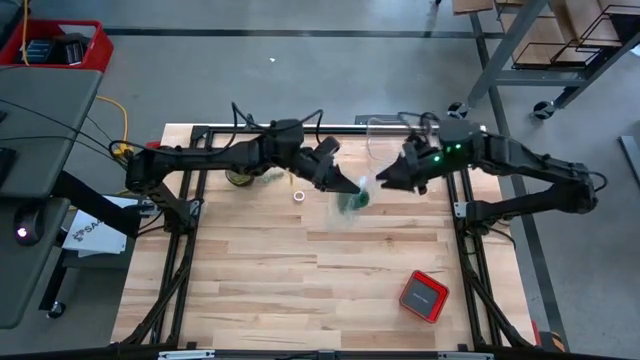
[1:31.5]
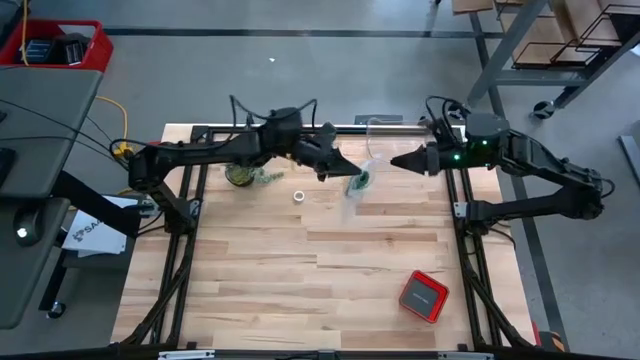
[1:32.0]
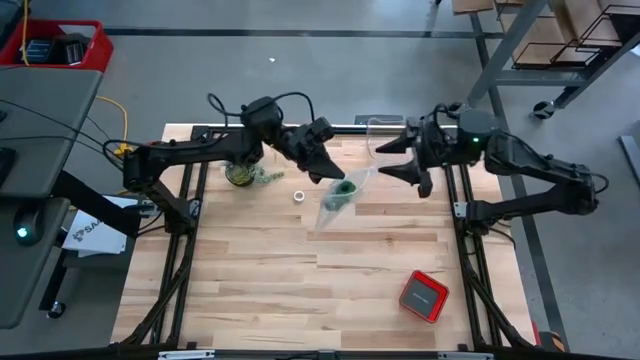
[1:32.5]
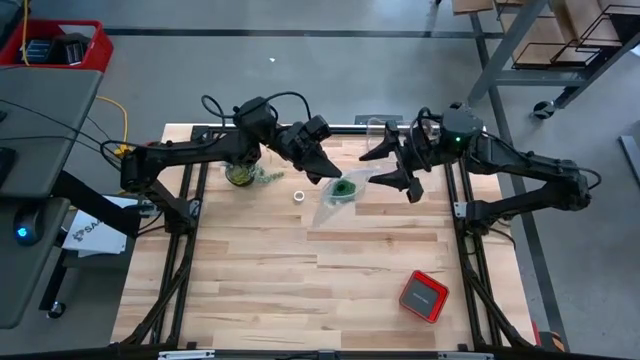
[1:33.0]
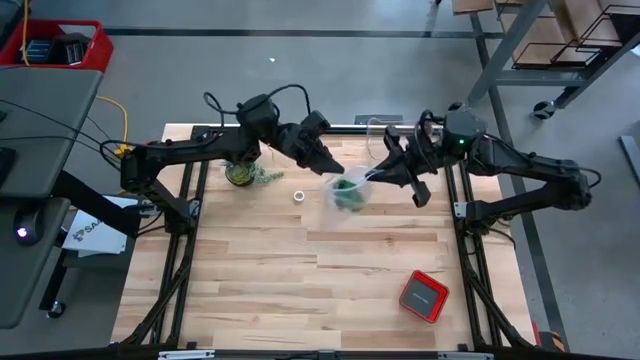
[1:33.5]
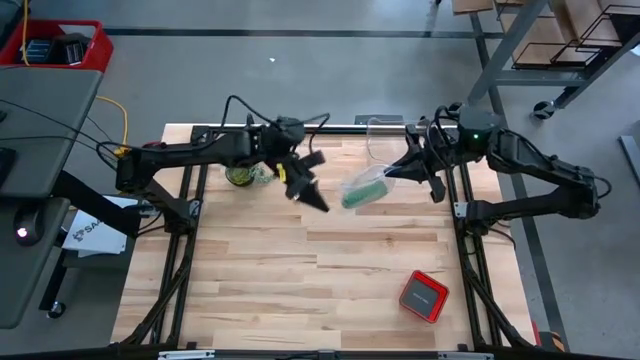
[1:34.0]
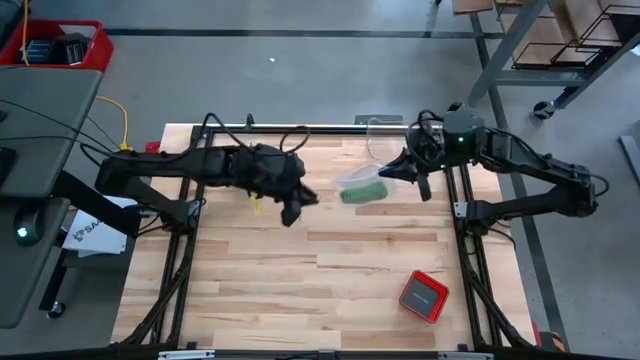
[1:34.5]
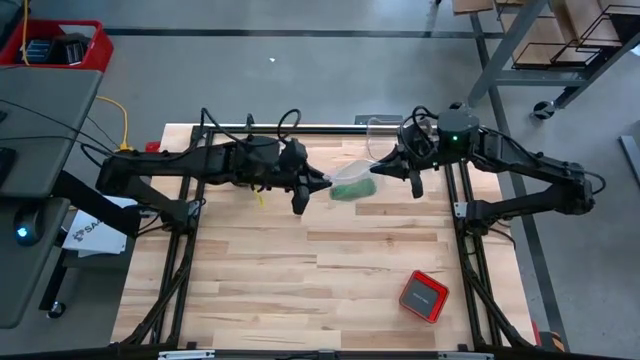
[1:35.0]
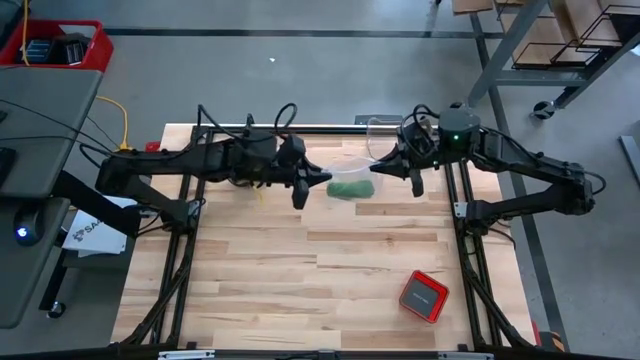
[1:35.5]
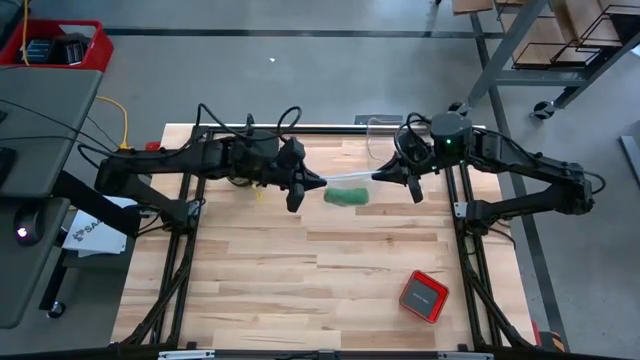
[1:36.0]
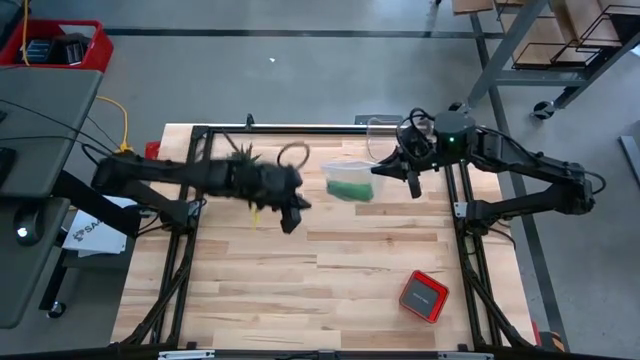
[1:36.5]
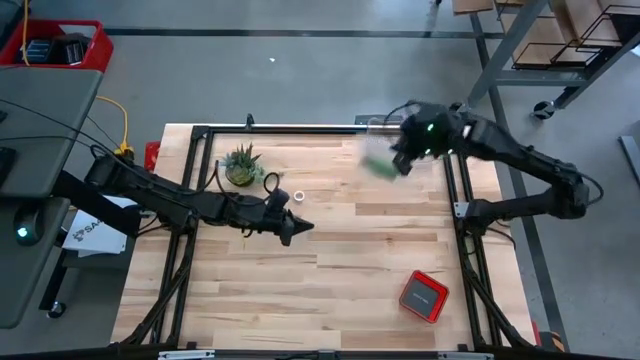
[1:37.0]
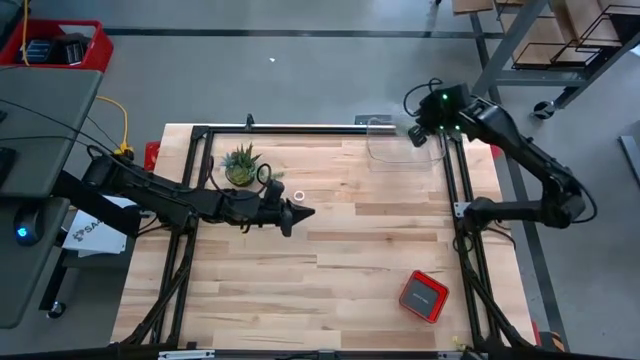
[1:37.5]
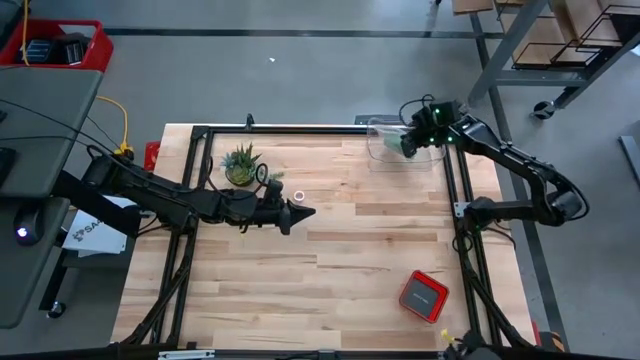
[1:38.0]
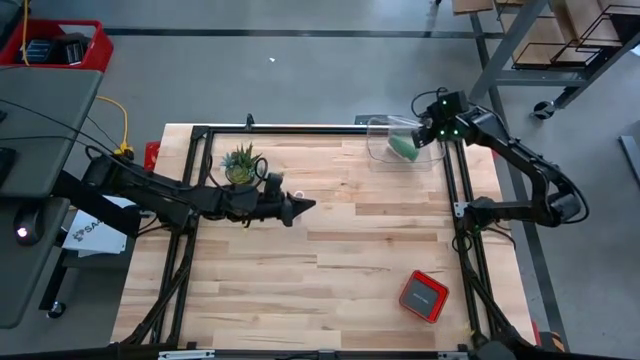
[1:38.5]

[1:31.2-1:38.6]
Task: Roll bandage
Put the transparent zip bag into the transparent bin

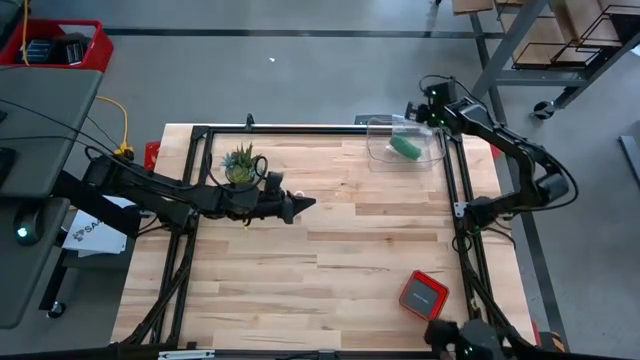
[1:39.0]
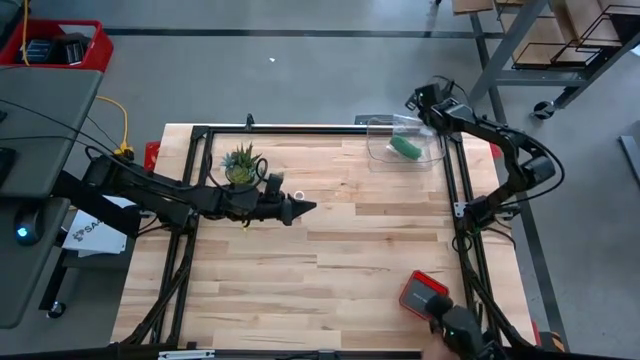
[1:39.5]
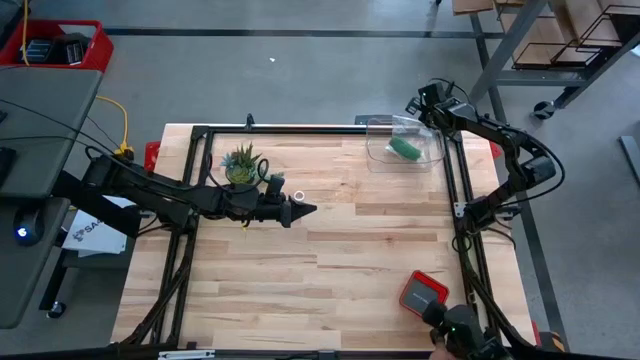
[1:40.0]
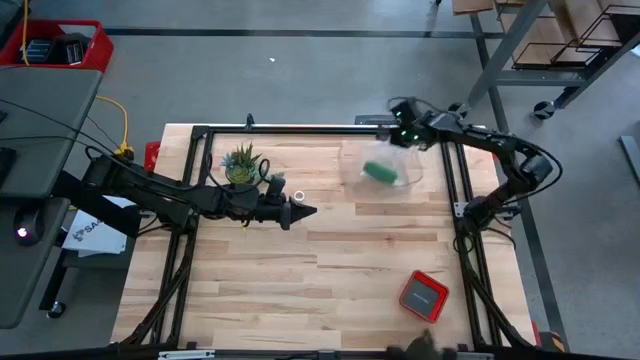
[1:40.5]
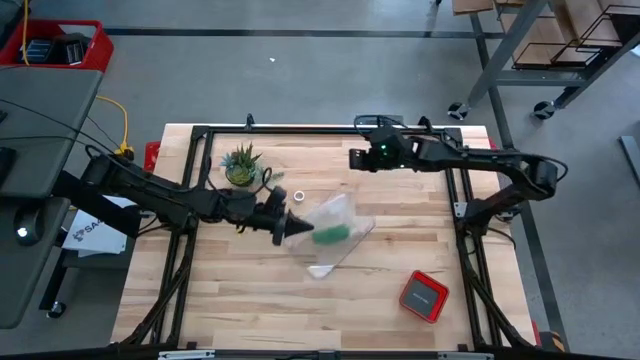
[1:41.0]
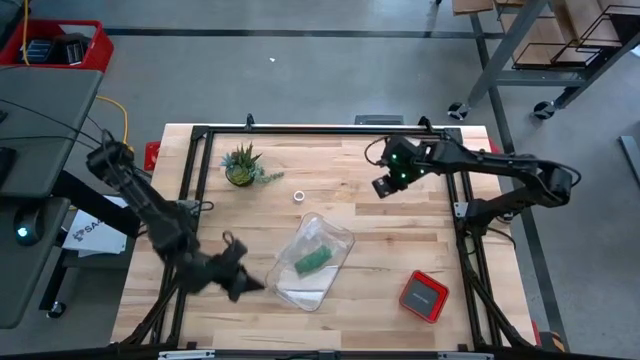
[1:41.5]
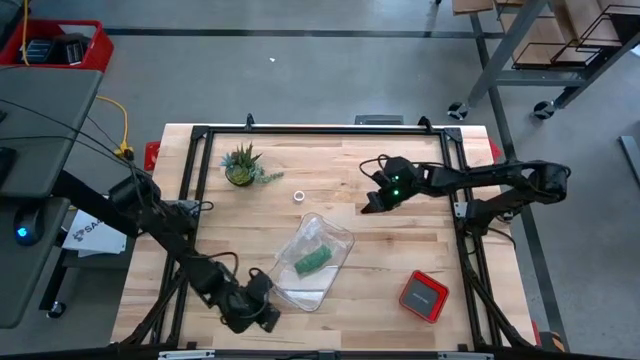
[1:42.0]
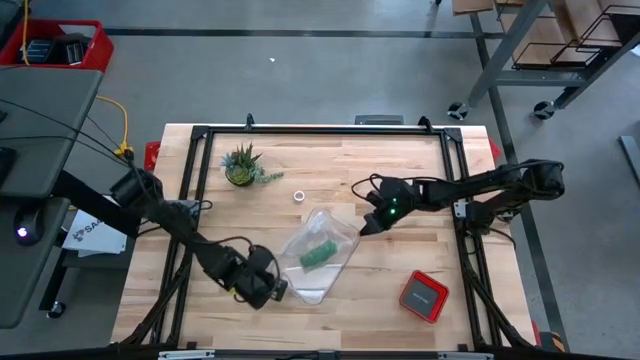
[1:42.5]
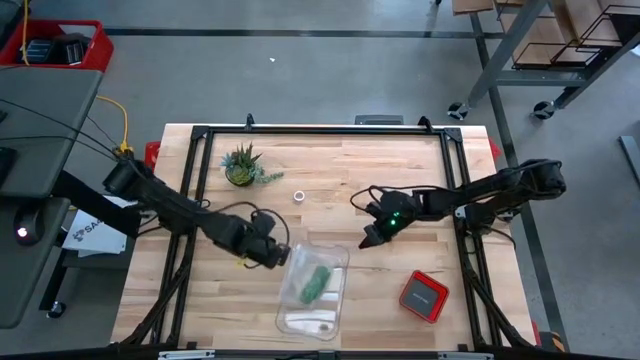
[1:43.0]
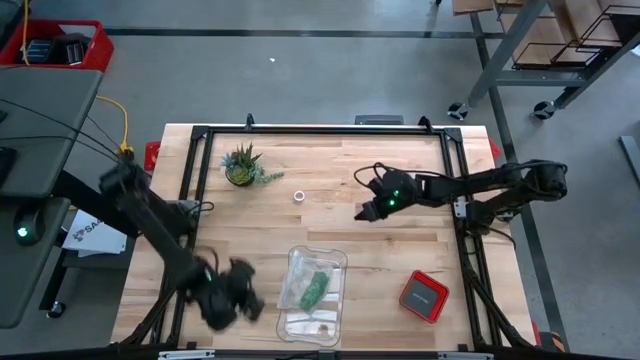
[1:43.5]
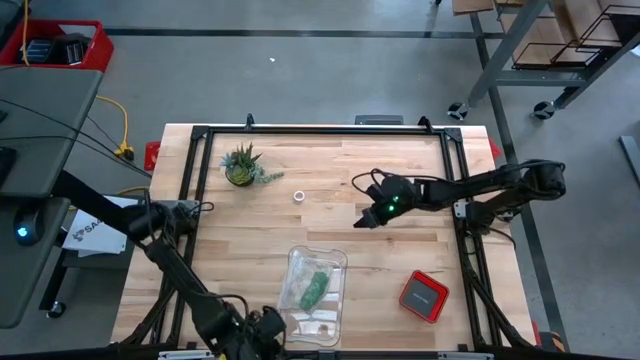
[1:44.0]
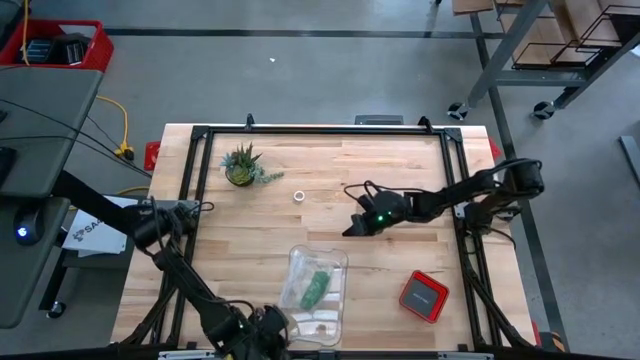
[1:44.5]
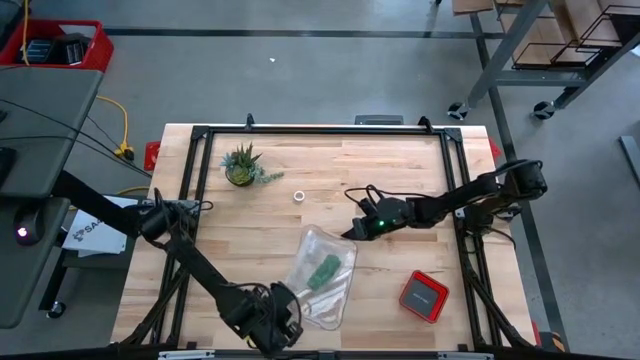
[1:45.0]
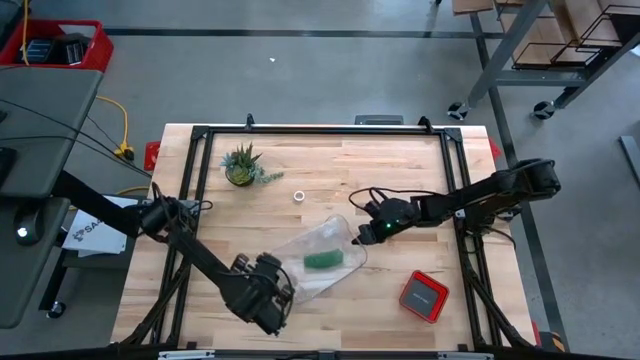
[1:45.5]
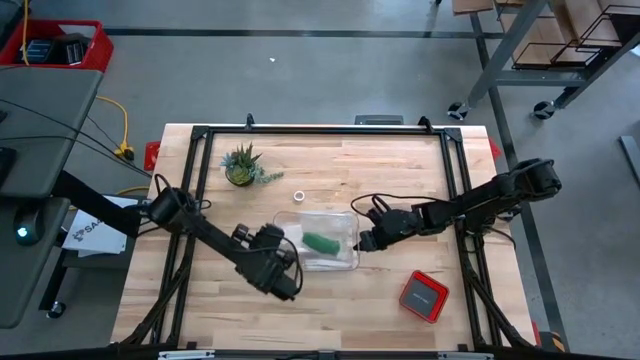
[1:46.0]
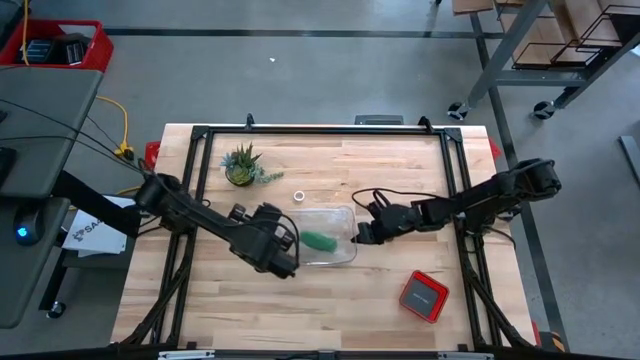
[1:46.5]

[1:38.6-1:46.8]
Move the transparent bin to the center

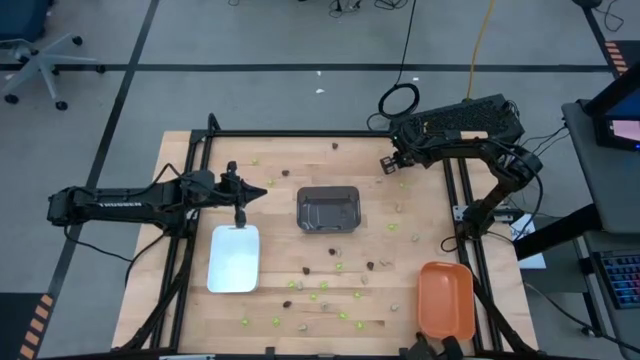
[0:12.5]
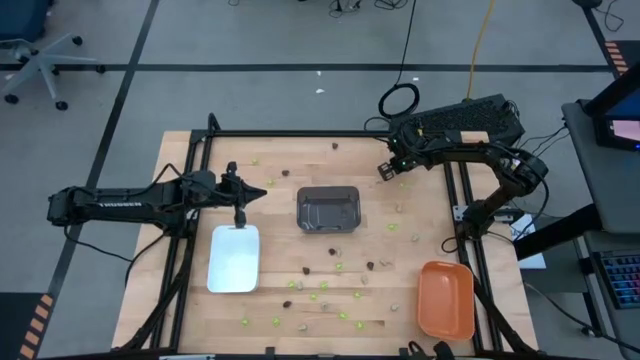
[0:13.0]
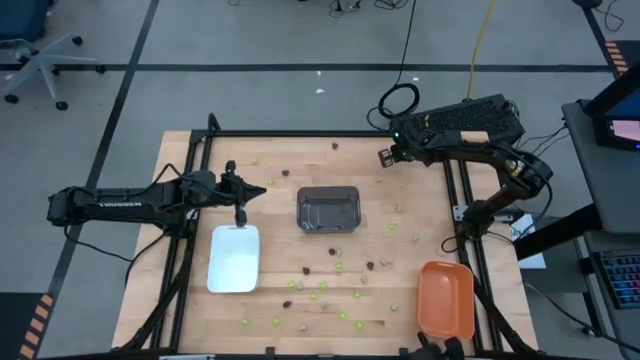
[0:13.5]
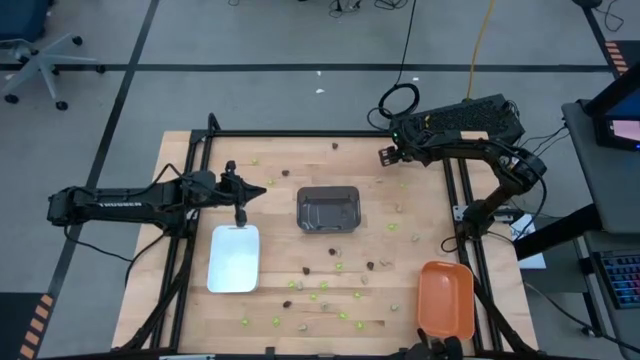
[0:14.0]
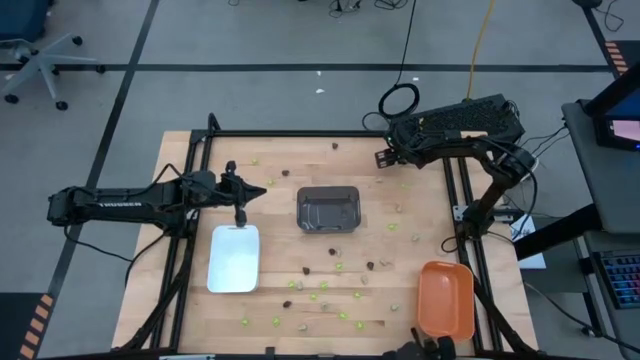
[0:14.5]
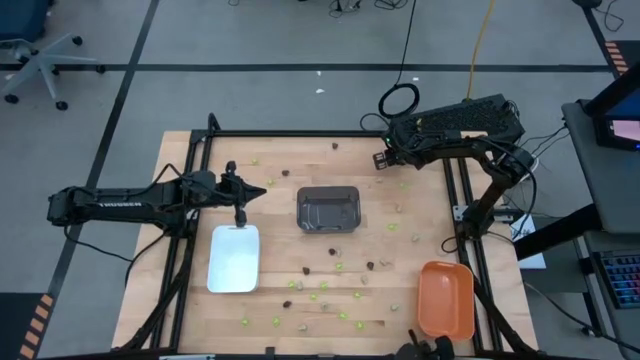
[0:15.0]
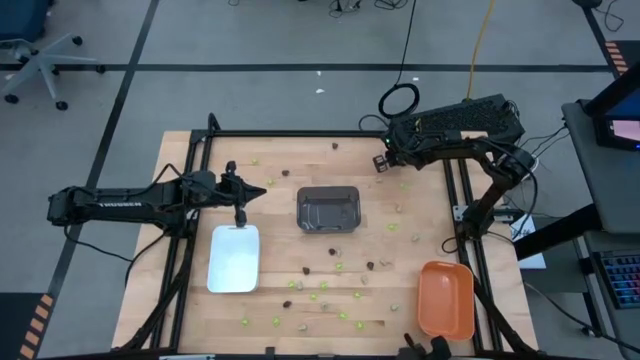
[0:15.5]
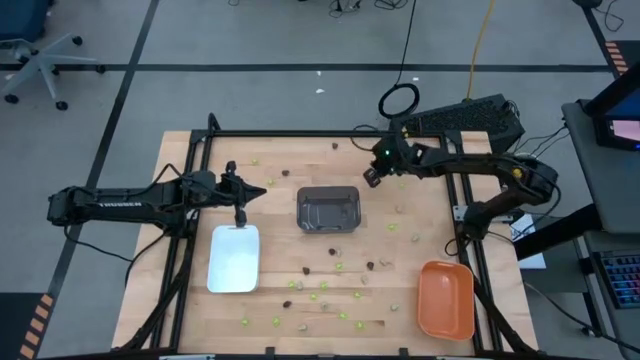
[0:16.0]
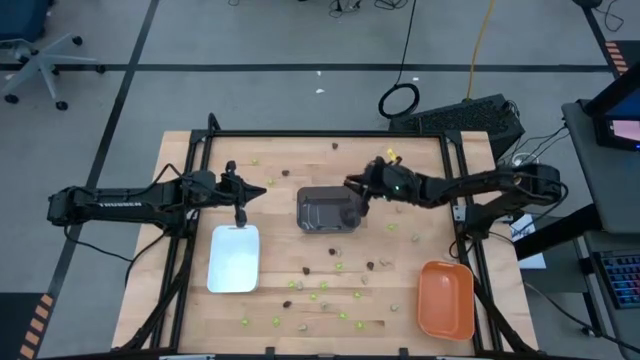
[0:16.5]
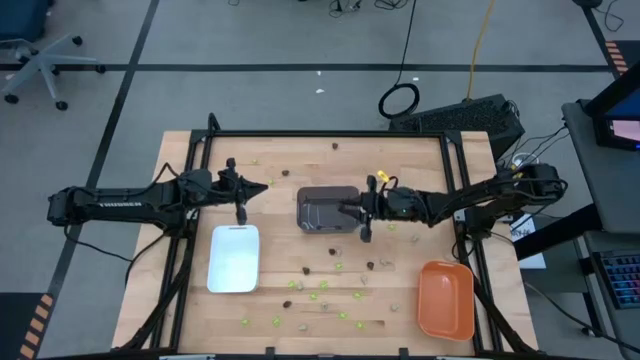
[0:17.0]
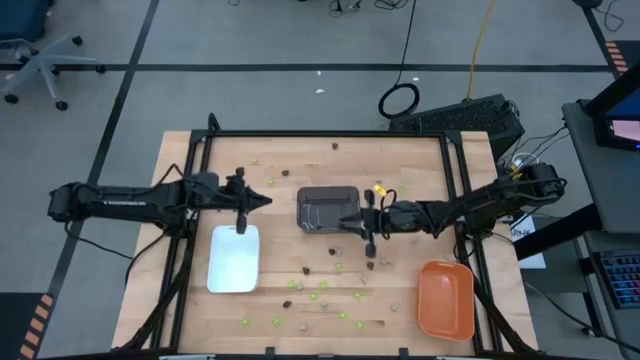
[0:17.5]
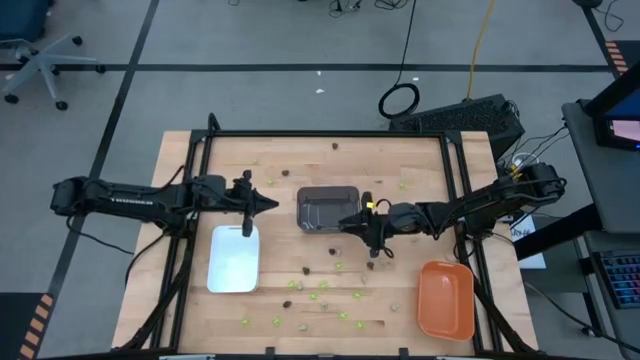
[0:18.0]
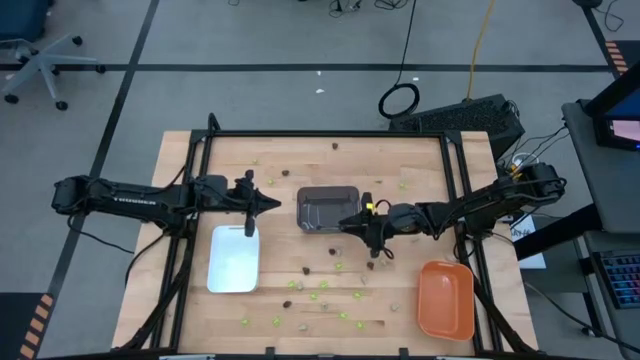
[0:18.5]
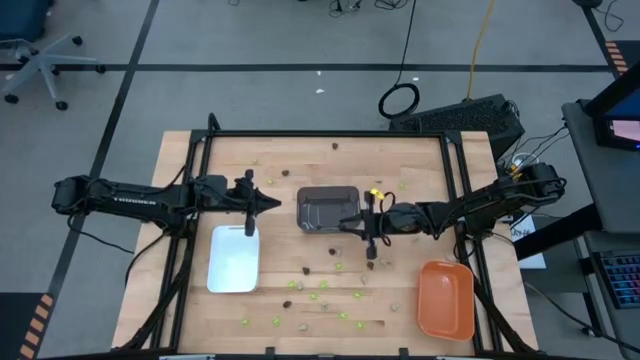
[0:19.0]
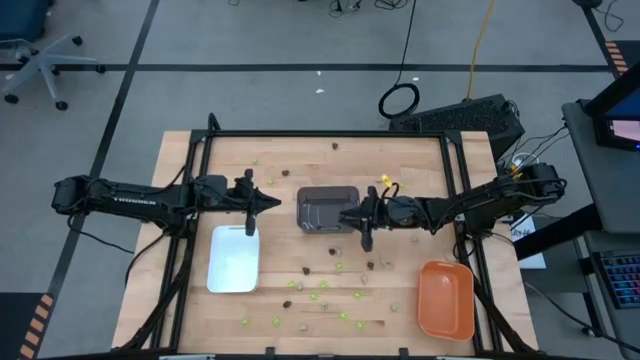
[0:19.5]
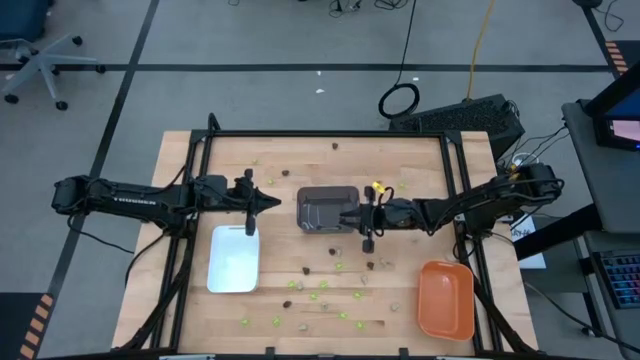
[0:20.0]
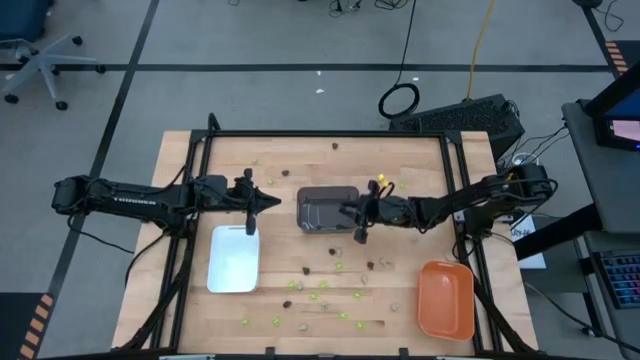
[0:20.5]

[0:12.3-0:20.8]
Task: Sort Halloween decoration
Put the black skull toy into the black bin
